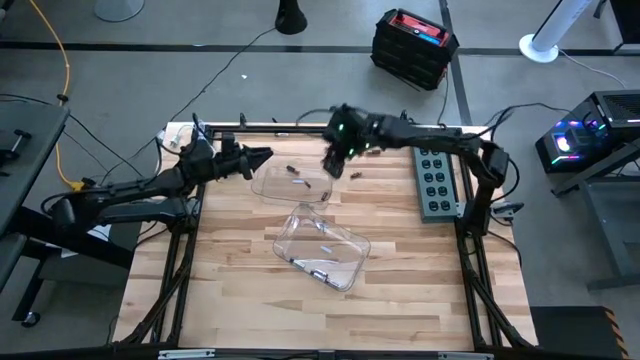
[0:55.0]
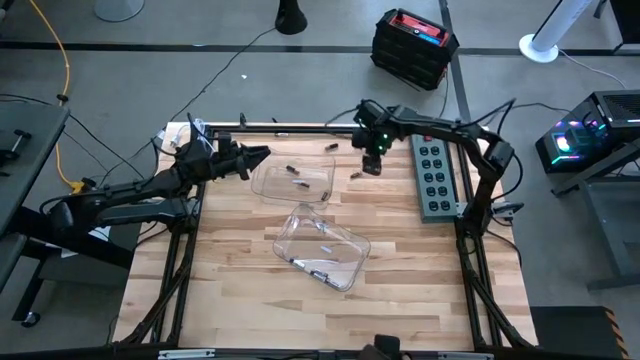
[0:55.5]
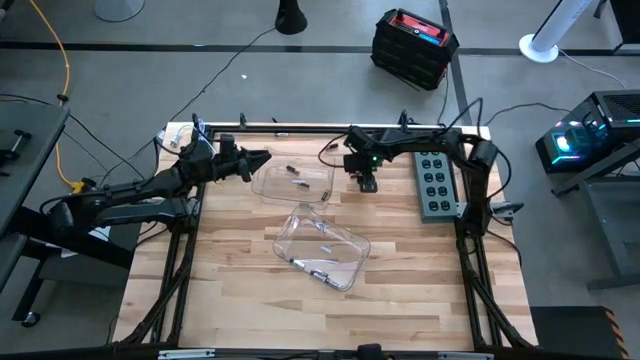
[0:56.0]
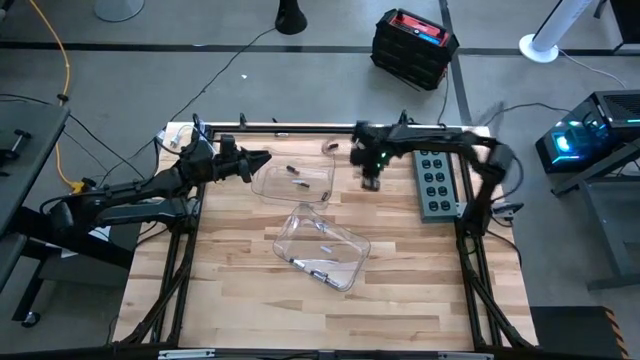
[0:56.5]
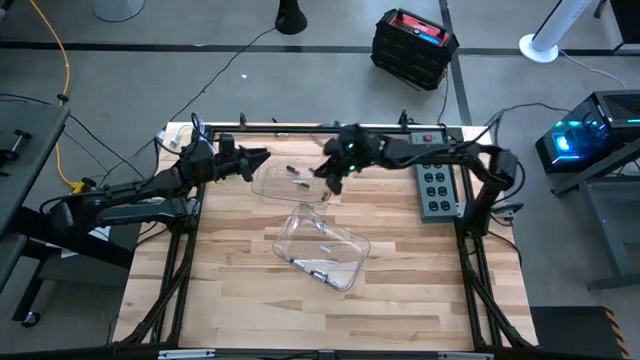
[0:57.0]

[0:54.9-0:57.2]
Task: Sort batteries
Put the black battery into the top transparent bin

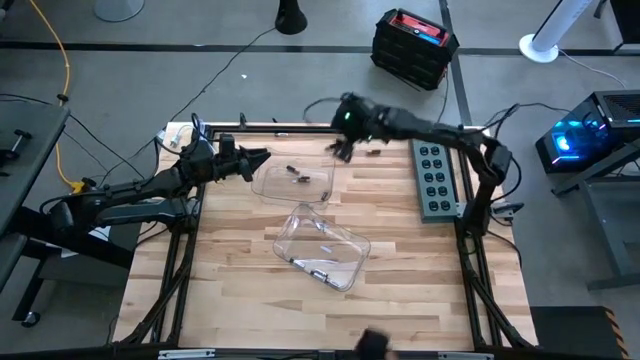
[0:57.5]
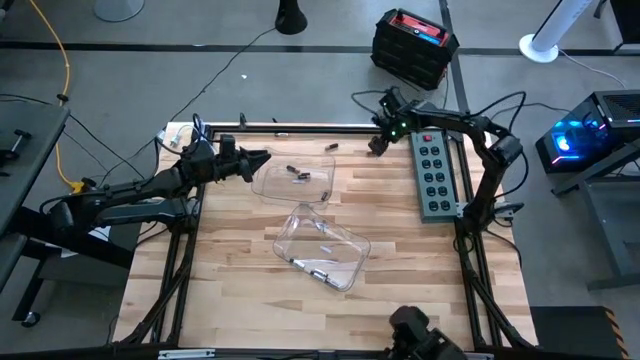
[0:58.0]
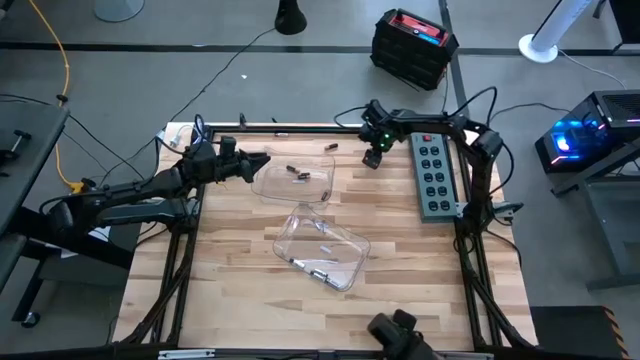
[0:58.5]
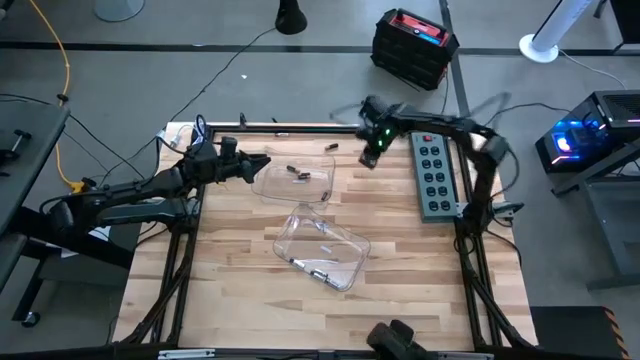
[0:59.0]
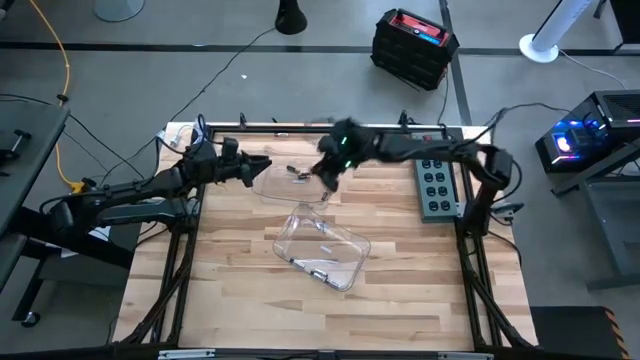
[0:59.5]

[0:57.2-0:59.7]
Put the black battery into the top transparent bin

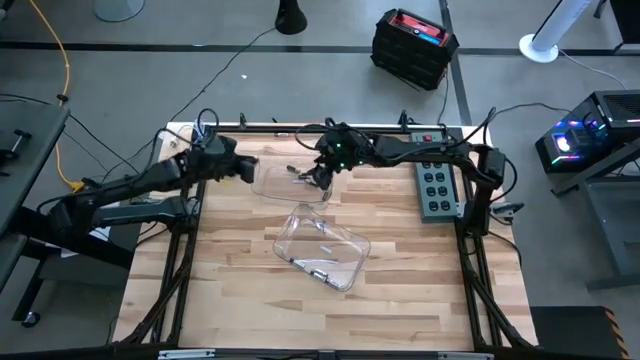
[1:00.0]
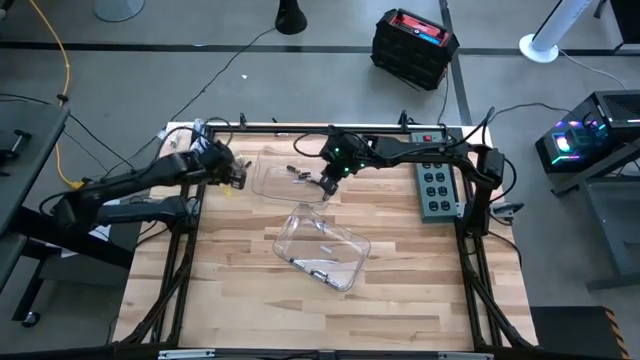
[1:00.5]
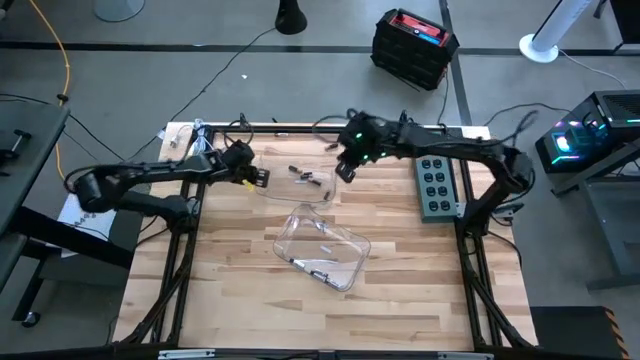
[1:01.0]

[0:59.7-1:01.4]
Adjust the top transparent bin

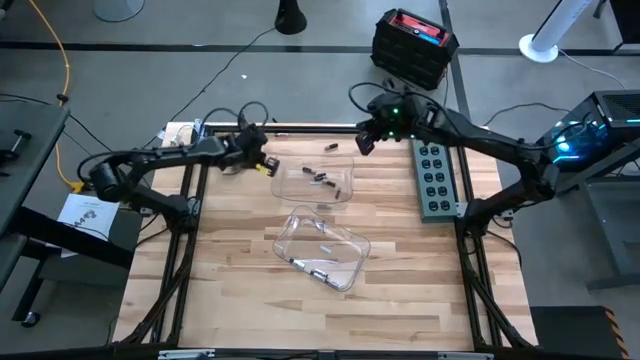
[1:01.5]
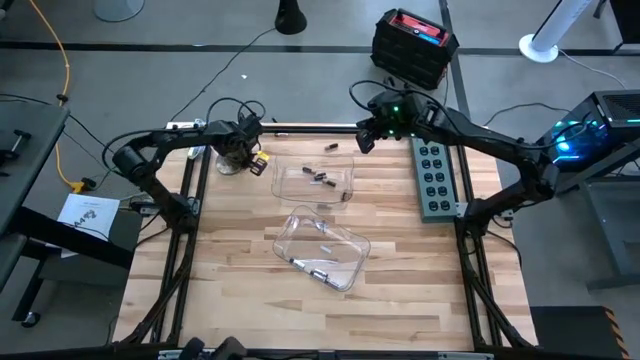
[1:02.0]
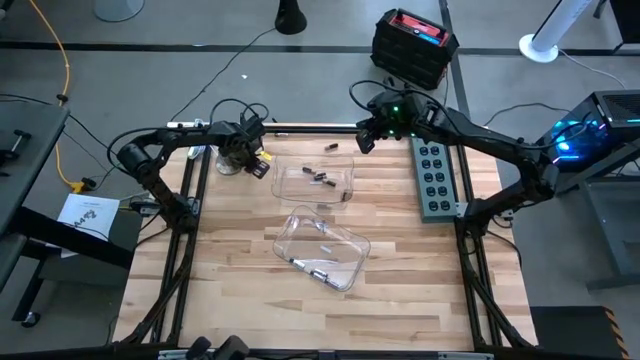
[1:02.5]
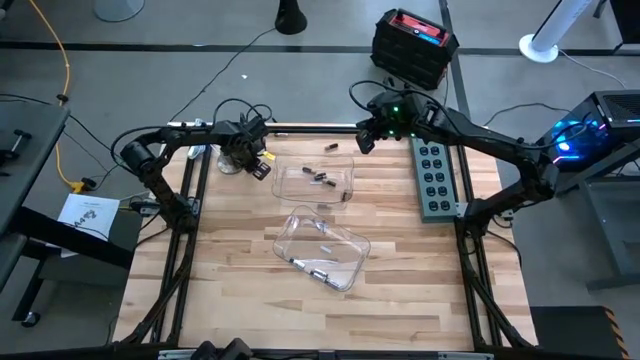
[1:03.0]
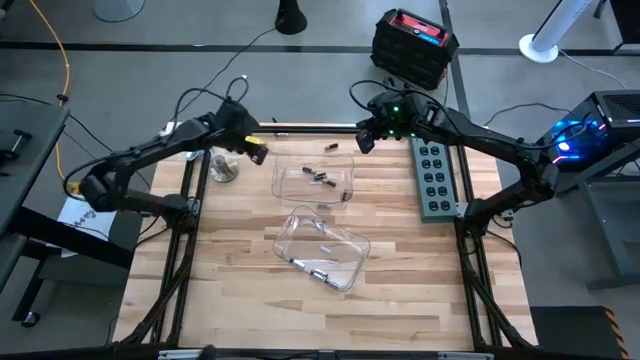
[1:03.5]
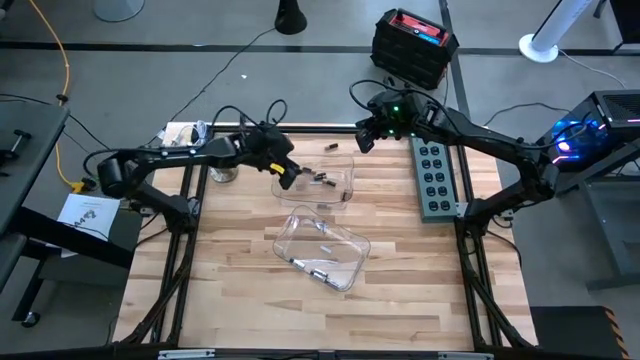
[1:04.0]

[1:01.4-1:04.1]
Put the black battery into the top transparent bin

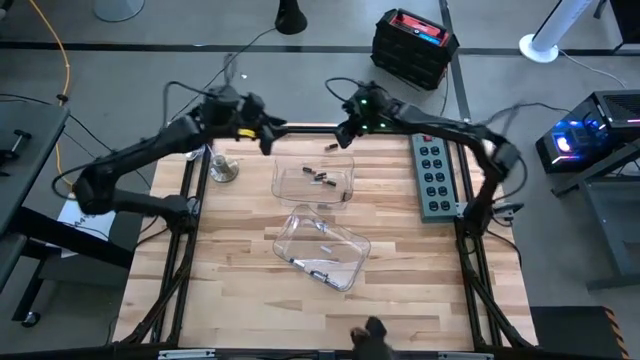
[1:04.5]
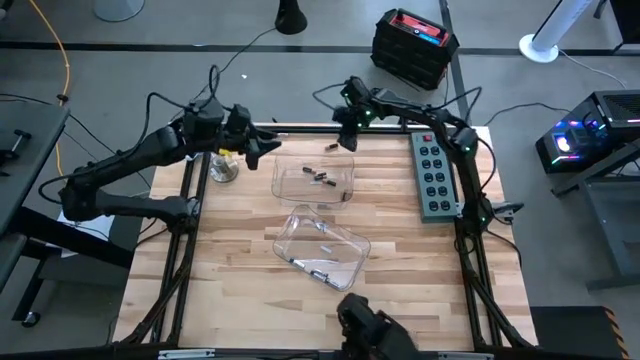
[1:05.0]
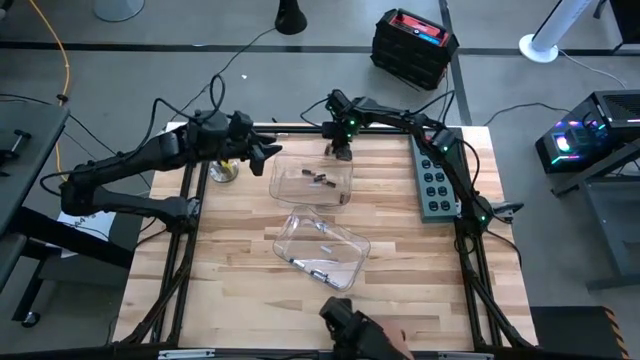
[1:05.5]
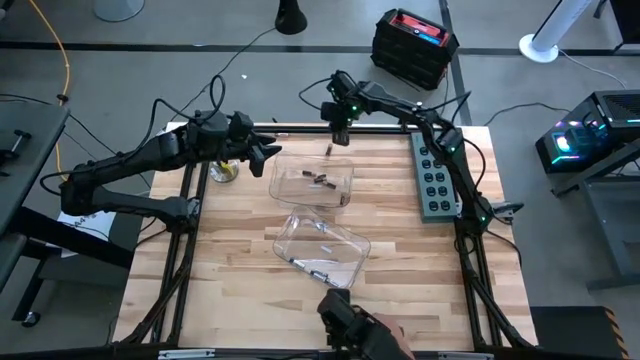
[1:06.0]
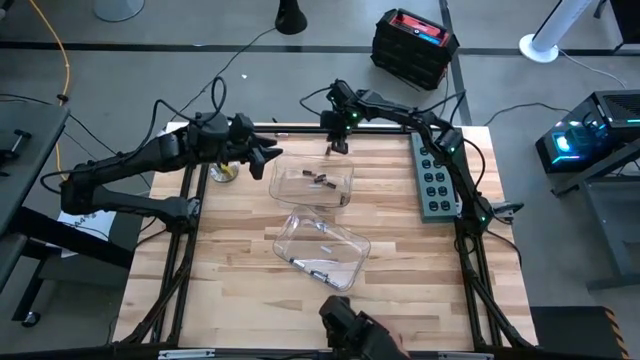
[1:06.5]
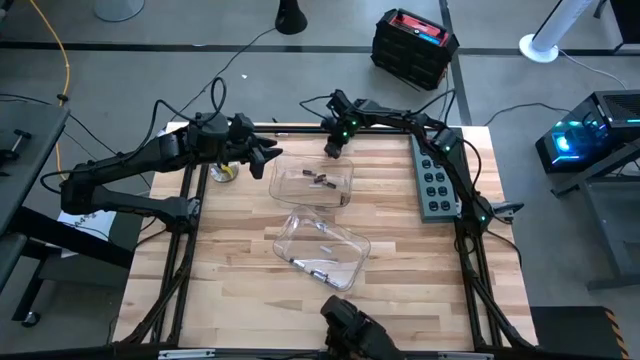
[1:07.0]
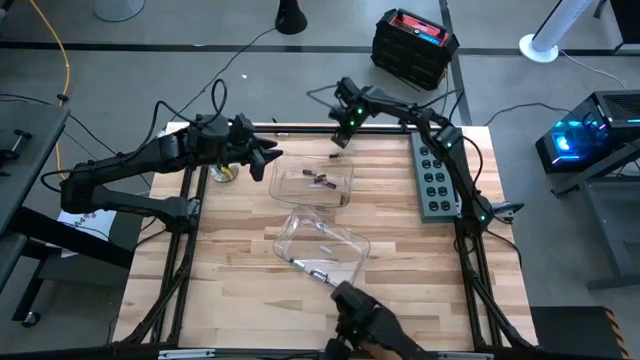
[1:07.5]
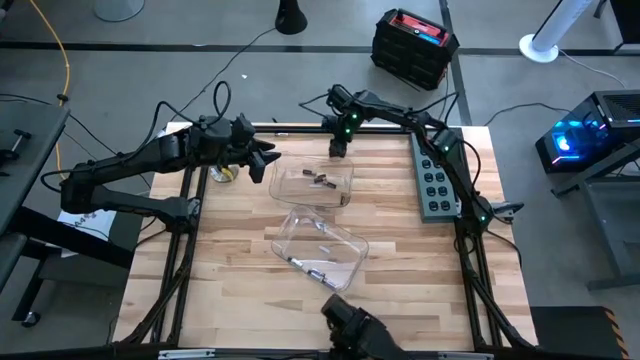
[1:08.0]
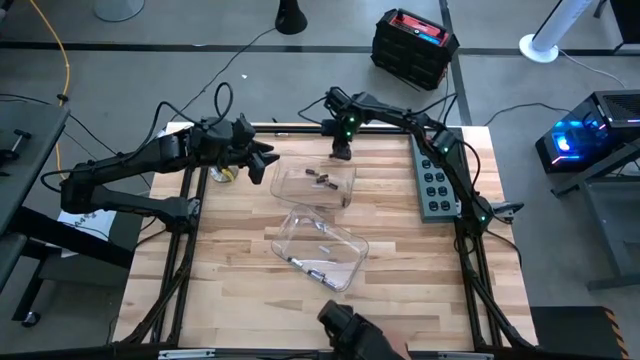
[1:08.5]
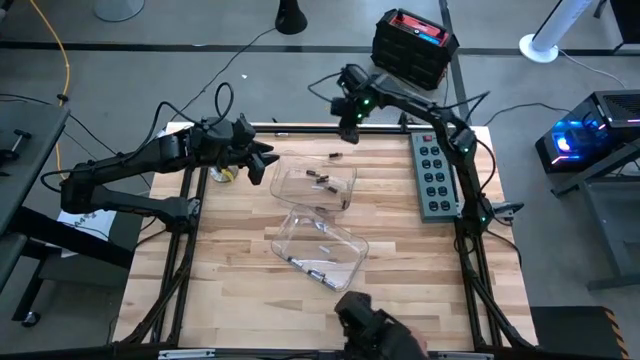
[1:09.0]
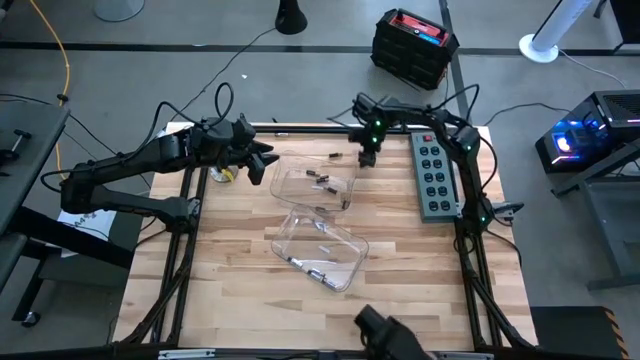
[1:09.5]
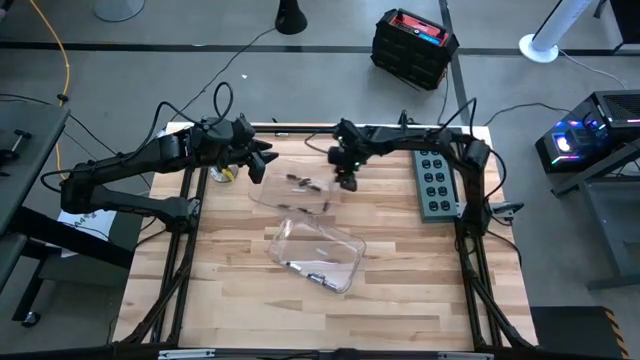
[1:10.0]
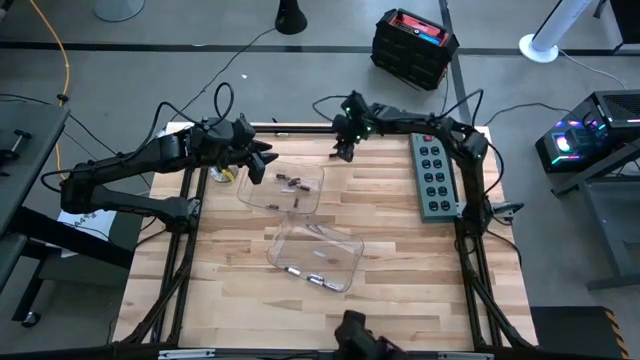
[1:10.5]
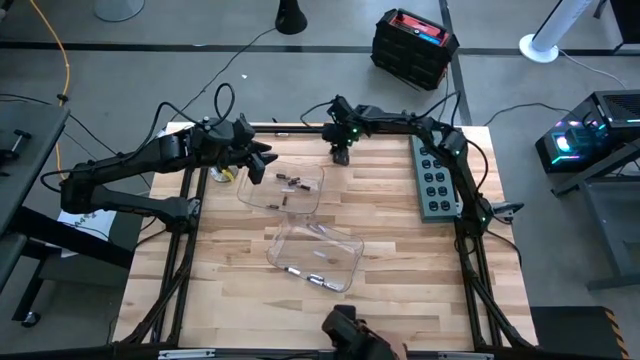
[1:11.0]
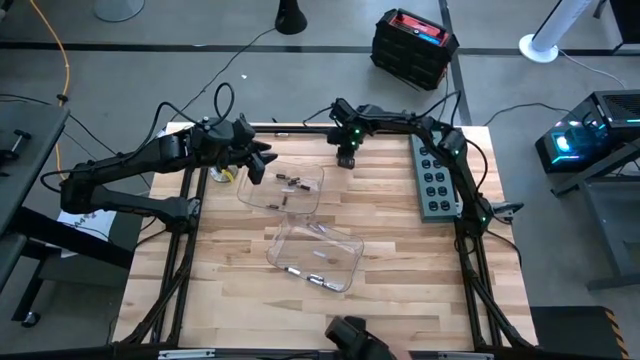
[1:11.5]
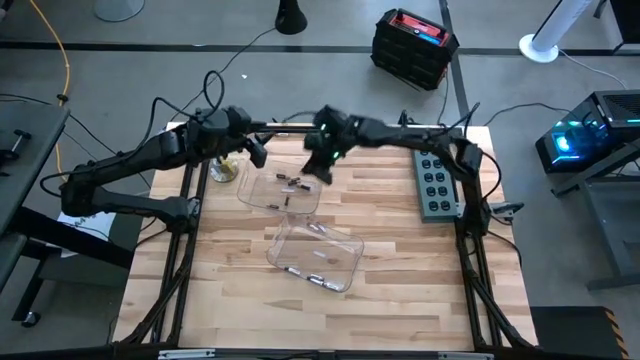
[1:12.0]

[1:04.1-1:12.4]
Put the black battery into the top transparent bin

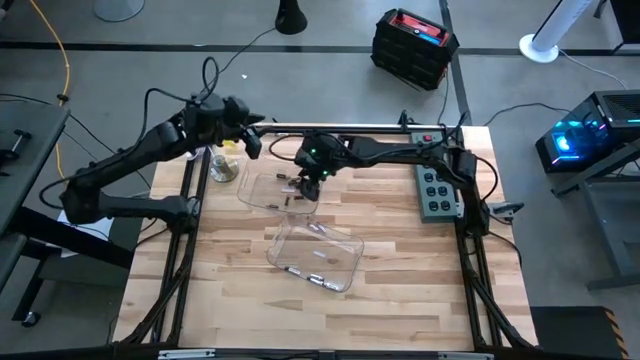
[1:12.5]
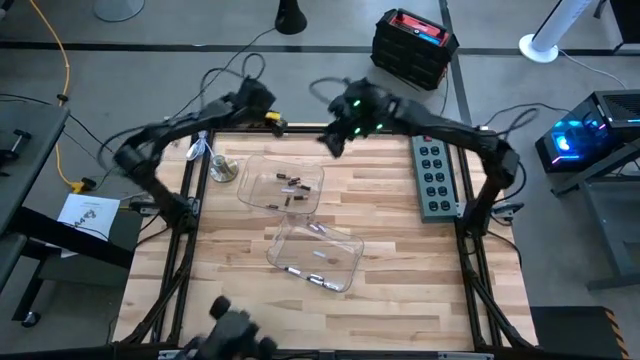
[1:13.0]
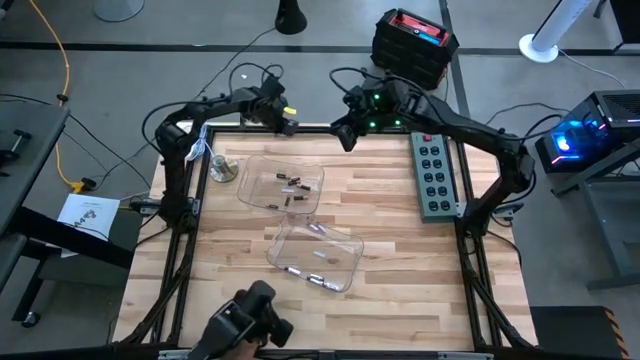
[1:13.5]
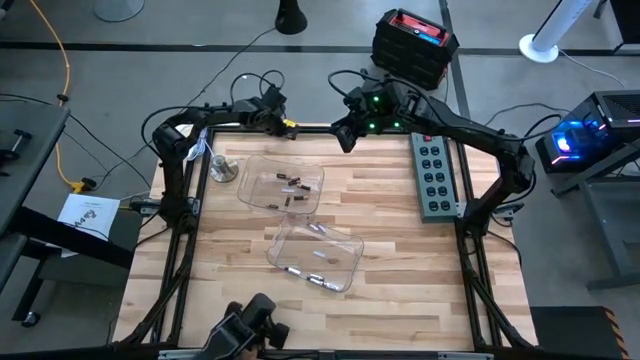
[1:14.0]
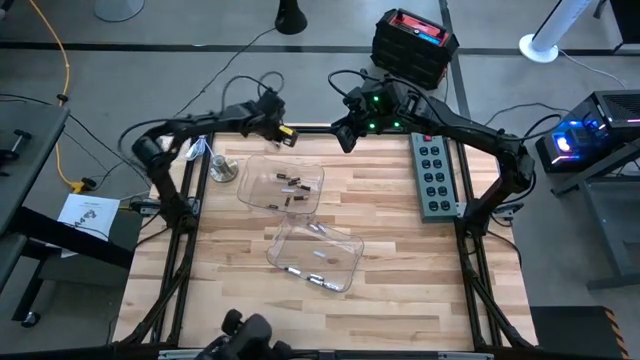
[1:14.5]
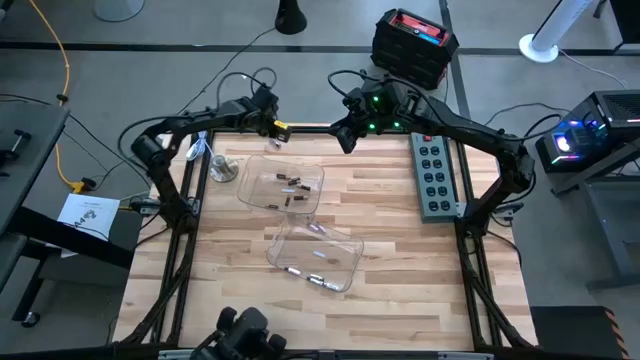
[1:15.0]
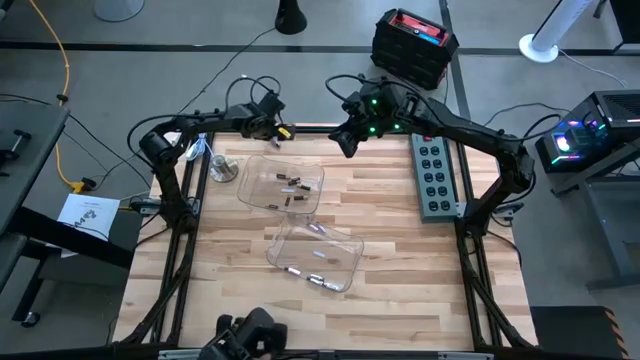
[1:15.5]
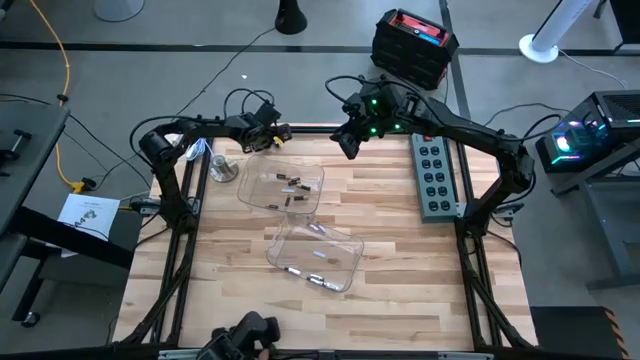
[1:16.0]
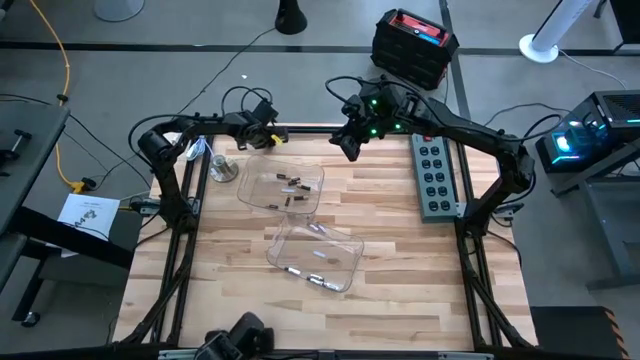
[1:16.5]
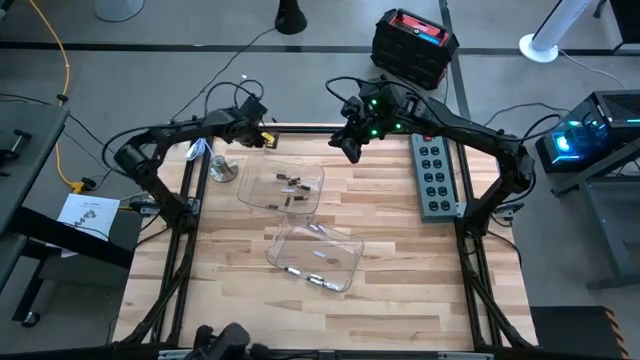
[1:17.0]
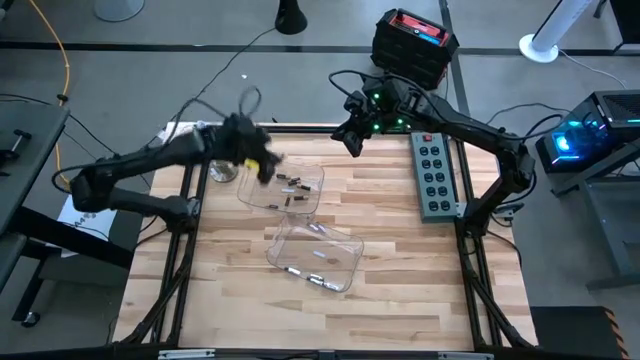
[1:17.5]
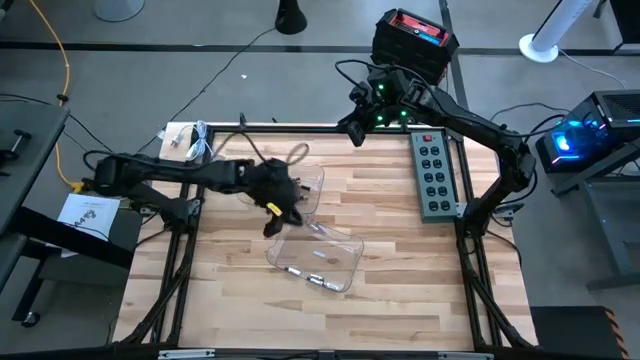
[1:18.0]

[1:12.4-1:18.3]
Put the silver battery into the bottom transparent bin
